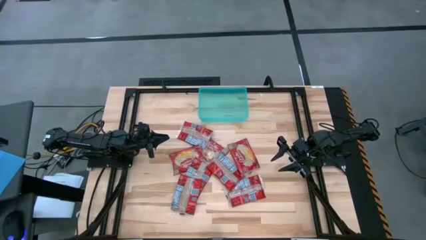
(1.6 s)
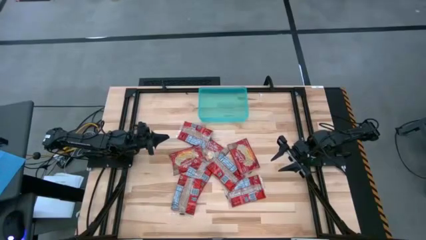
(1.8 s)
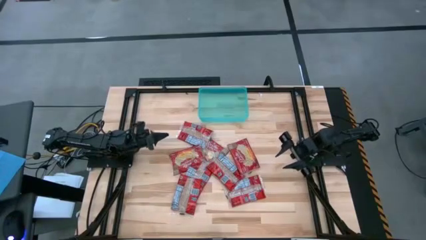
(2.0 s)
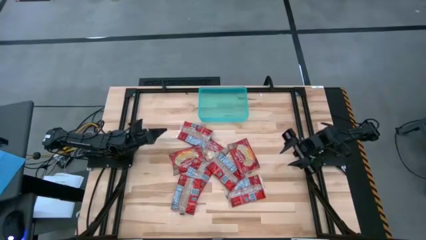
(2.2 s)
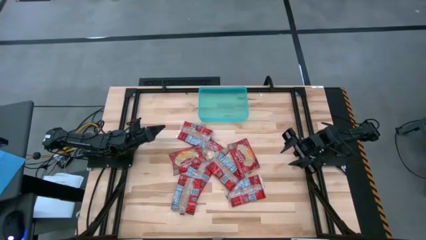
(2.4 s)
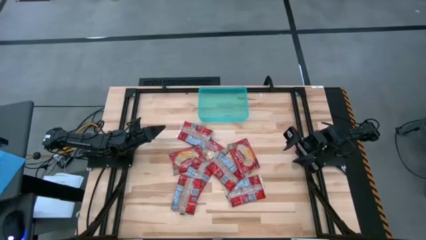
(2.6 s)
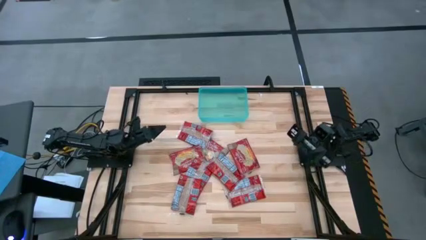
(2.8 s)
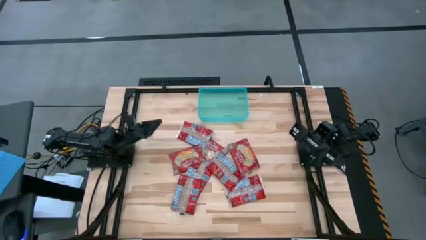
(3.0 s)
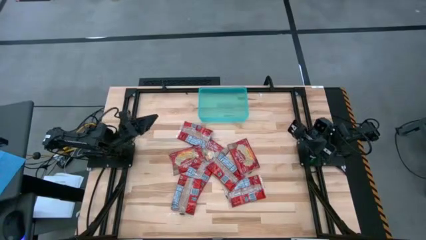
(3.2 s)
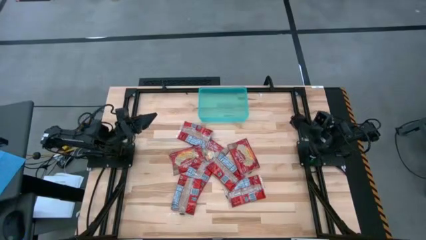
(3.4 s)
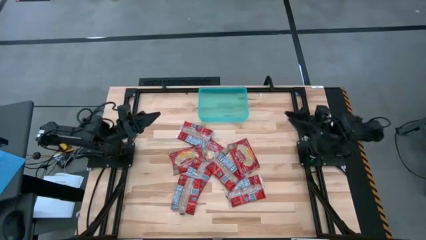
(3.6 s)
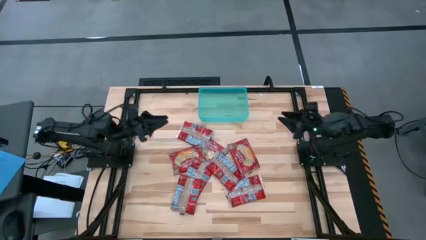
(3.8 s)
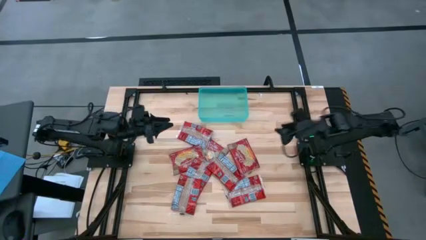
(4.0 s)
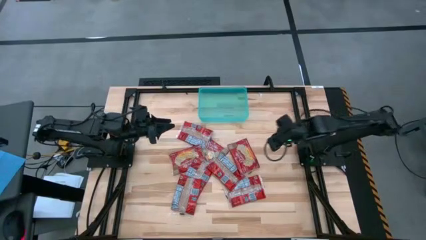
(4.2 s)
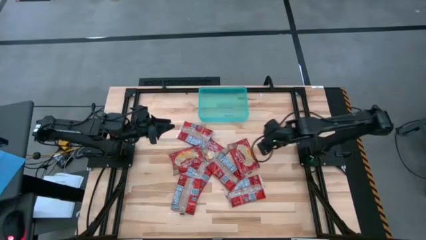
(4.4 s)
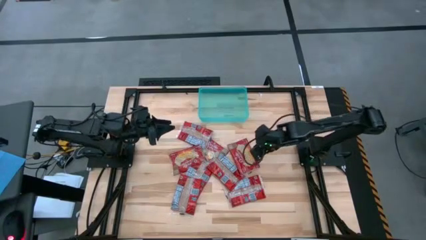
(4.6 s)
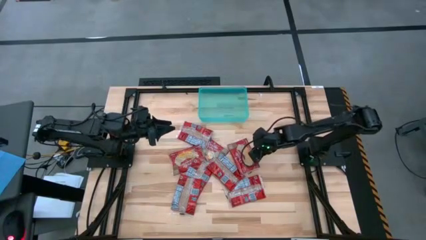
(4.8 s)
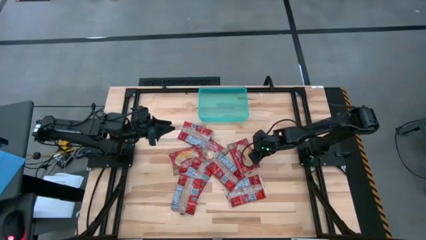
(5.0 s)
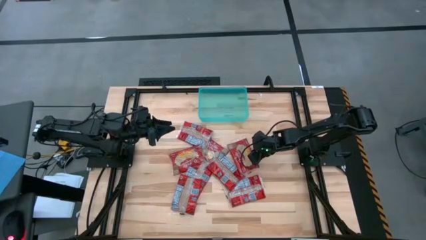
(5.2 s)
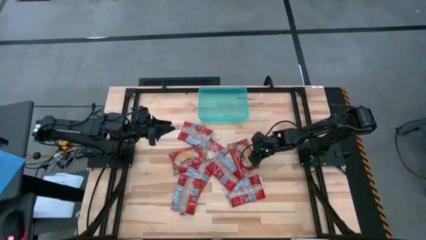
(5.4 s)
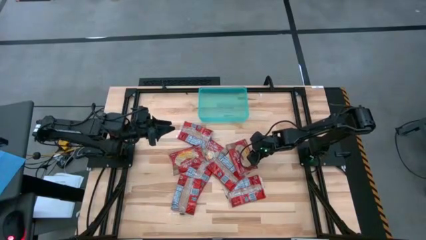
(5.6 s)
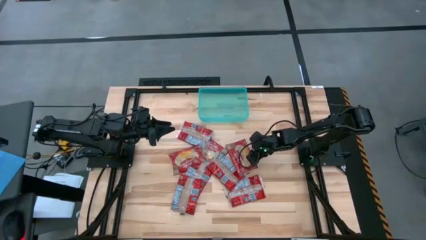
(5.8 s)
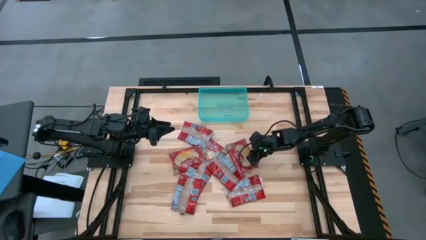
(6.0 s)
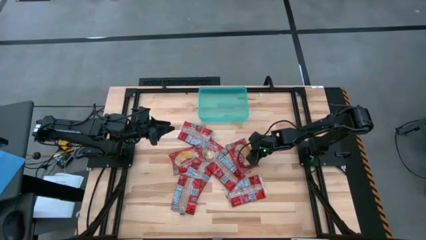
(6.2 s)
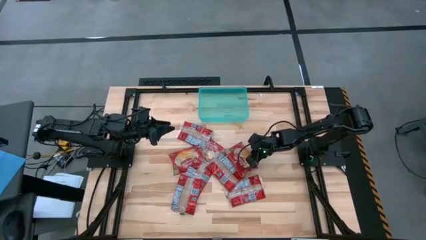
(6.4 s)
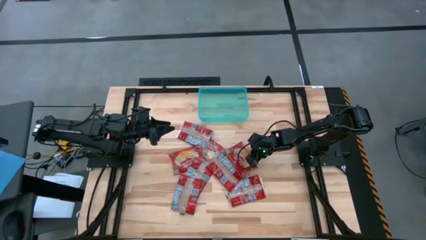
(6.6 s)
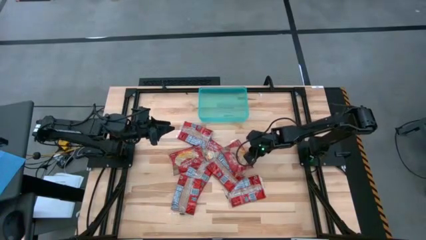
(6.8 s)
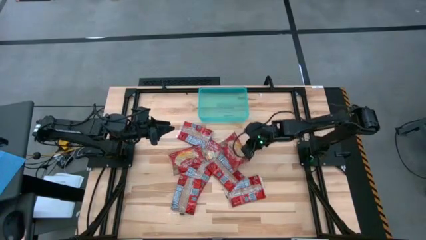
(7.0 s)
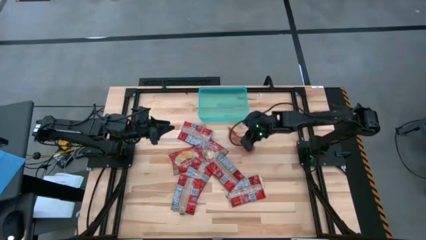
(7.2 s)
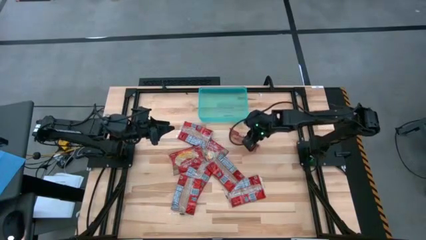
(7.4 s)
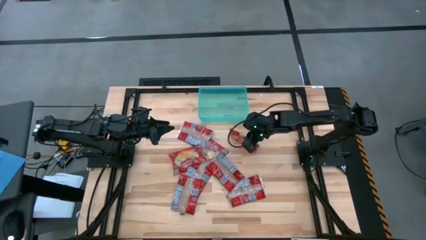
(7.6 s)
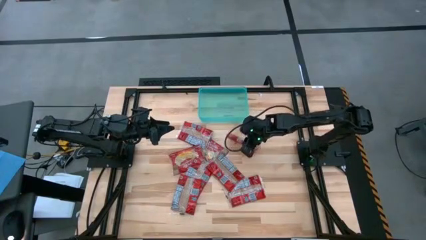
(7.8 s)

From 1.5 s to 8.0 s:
Task: Sort popcorn bags into baskets
Put the red popcorn bag into the green bin

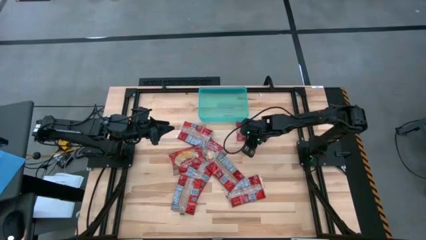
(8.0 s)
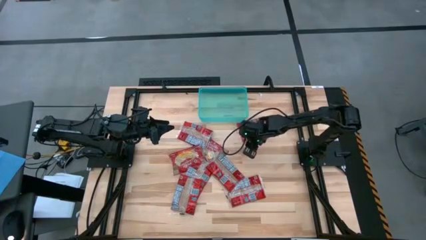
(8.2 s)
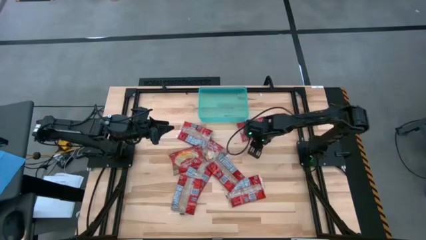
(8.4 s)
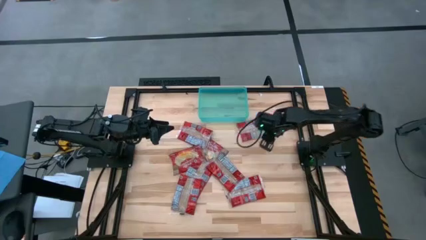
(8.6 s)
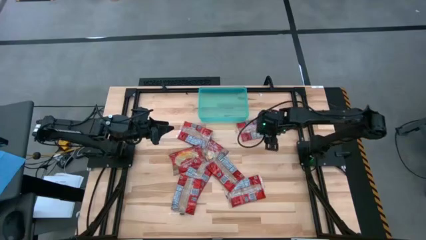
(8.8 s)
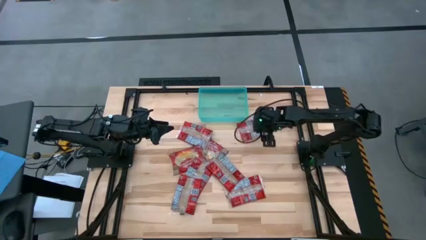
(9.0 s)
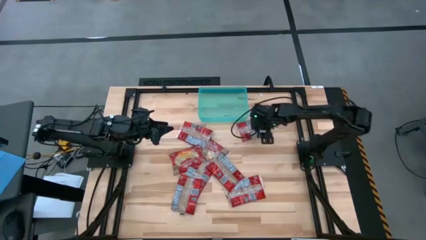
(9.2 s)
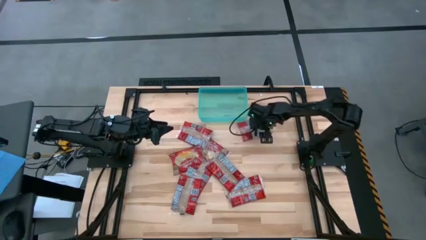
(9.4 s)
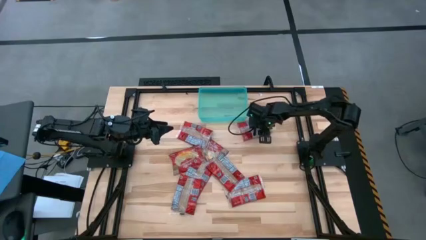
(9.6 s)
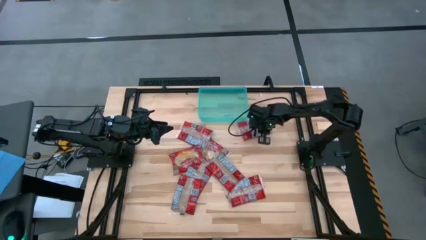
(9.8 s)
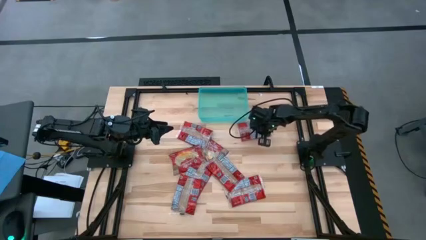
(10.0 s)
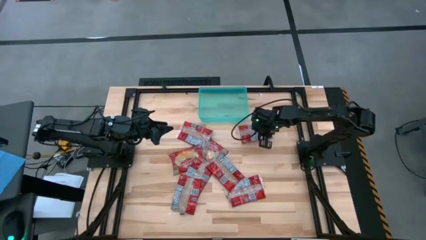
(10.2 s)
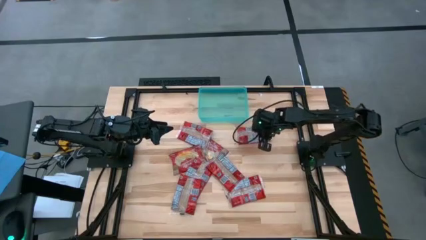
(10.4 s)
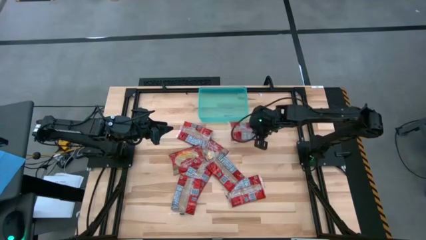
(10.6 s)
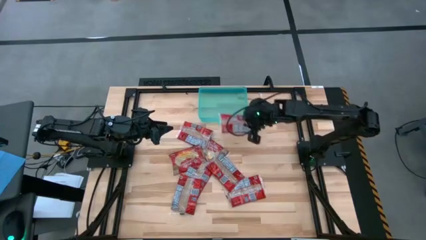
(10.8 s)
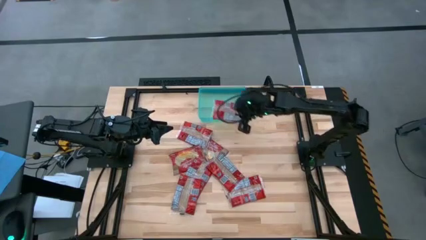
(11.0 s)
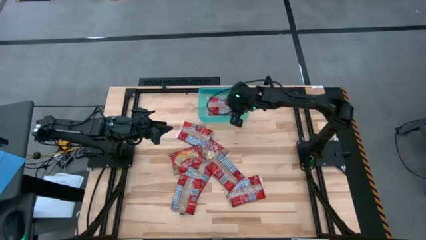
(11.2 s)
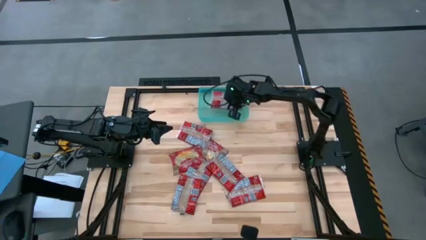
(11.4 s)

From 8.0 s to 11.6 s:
Put the red popcorn bag into the green bin

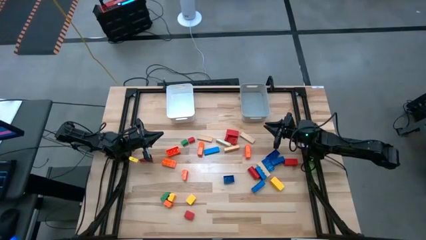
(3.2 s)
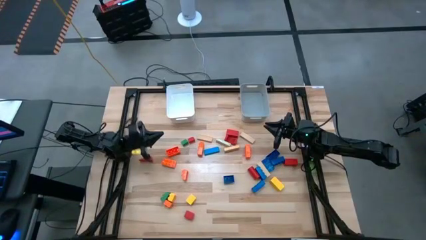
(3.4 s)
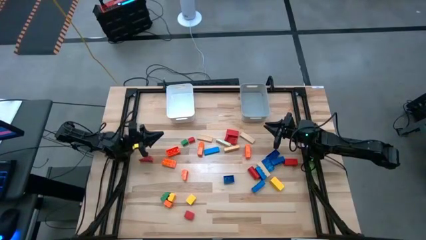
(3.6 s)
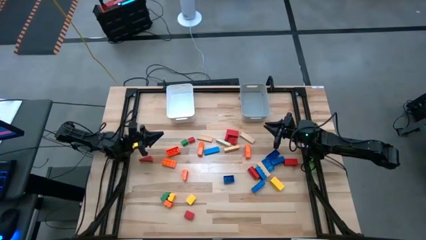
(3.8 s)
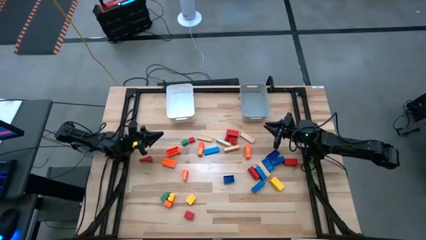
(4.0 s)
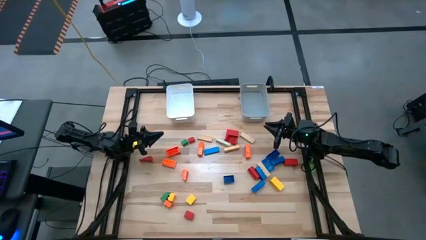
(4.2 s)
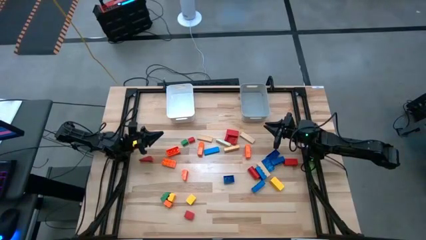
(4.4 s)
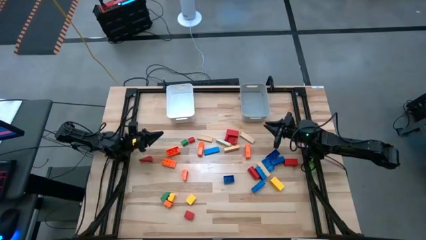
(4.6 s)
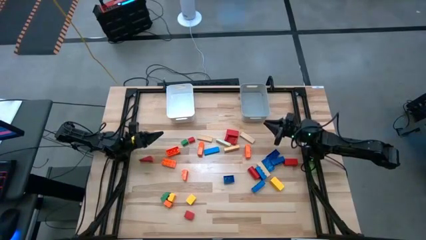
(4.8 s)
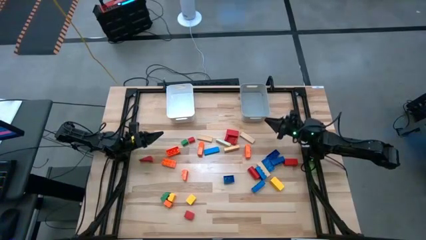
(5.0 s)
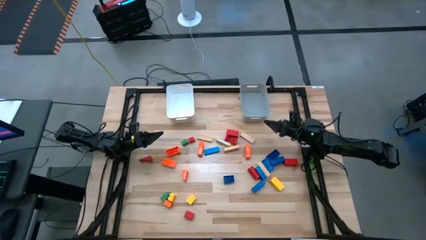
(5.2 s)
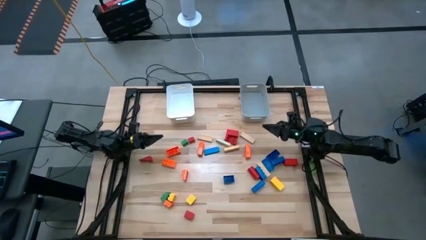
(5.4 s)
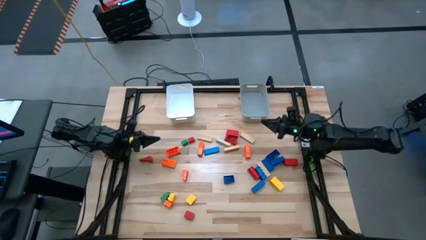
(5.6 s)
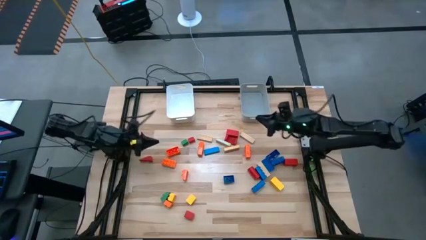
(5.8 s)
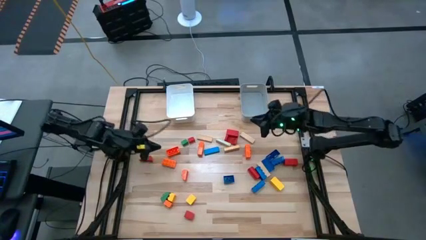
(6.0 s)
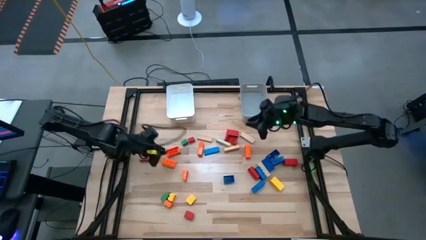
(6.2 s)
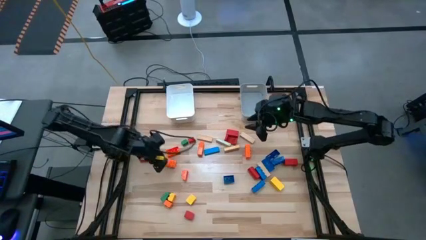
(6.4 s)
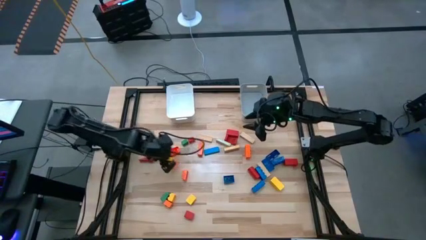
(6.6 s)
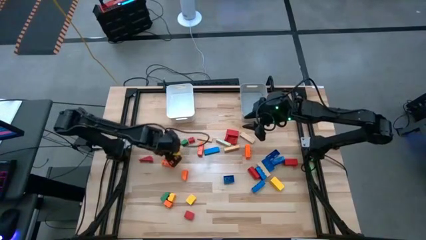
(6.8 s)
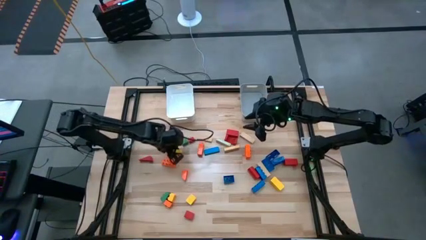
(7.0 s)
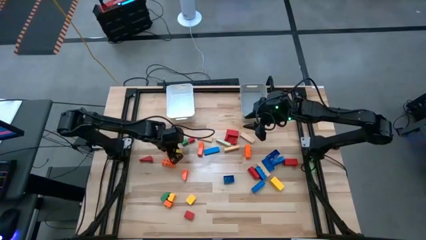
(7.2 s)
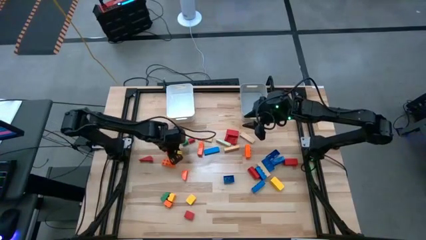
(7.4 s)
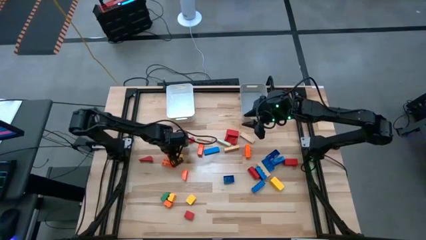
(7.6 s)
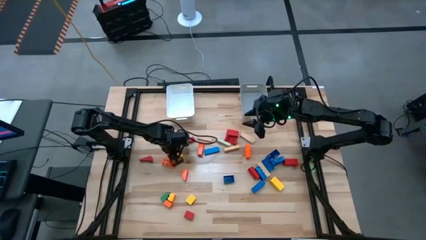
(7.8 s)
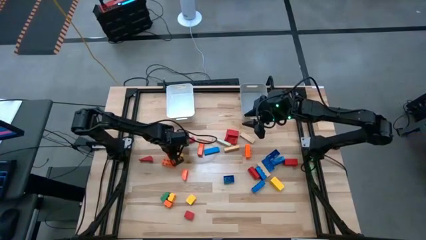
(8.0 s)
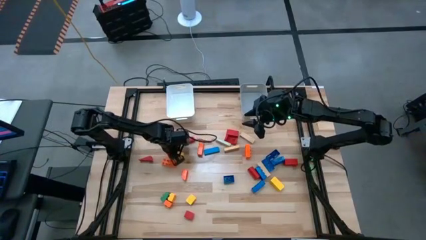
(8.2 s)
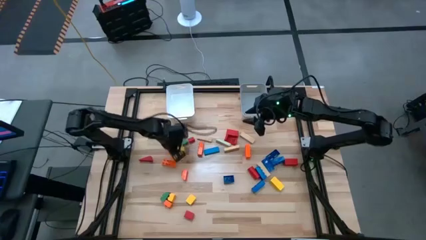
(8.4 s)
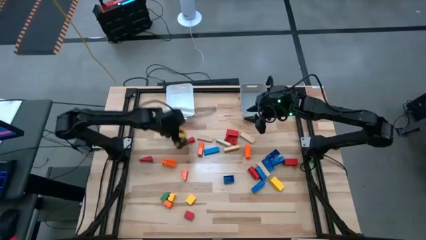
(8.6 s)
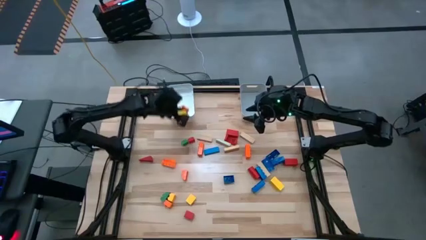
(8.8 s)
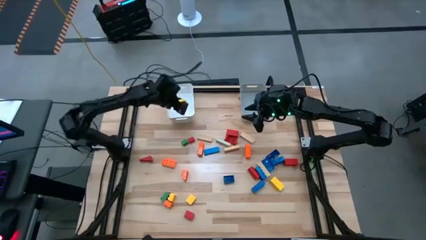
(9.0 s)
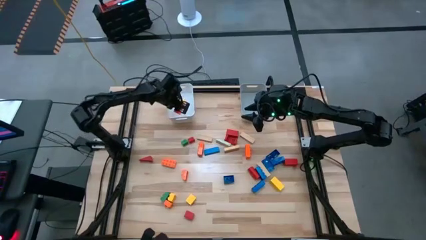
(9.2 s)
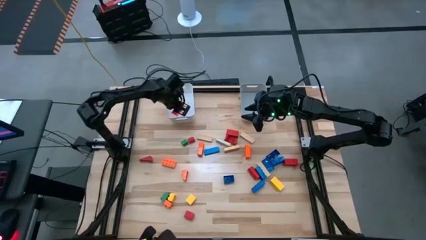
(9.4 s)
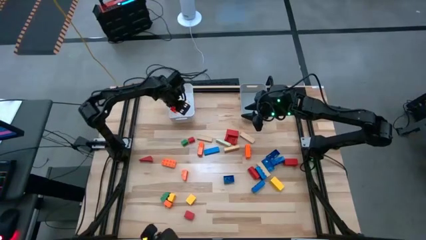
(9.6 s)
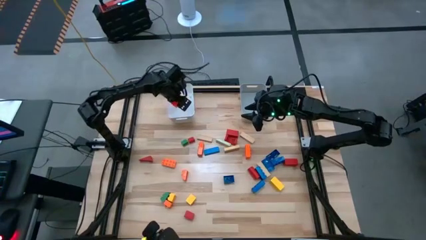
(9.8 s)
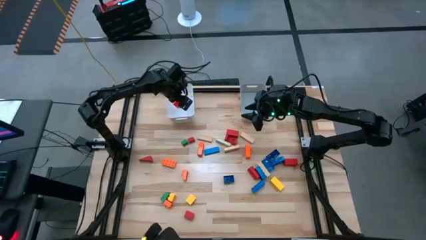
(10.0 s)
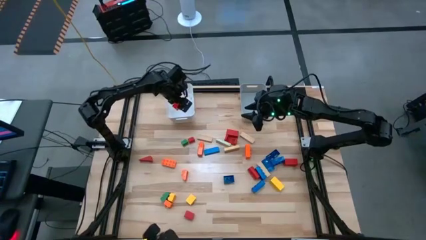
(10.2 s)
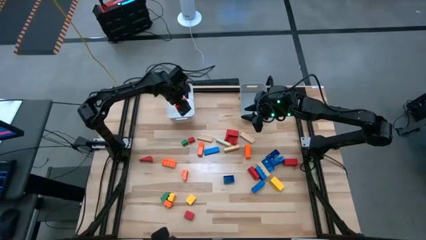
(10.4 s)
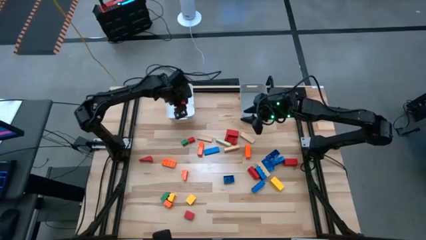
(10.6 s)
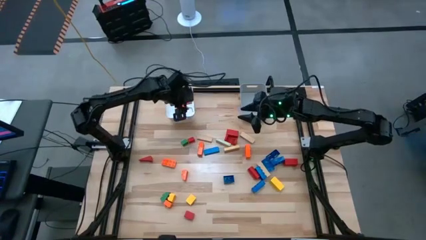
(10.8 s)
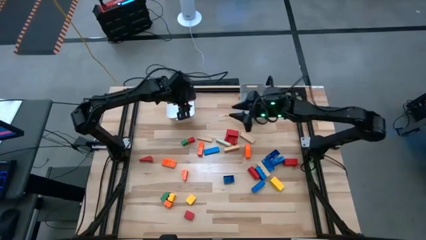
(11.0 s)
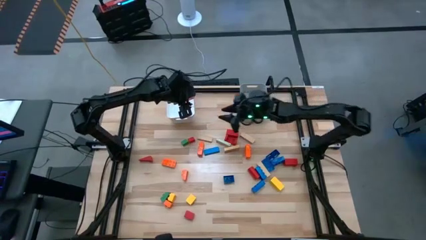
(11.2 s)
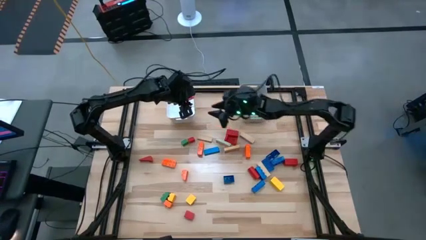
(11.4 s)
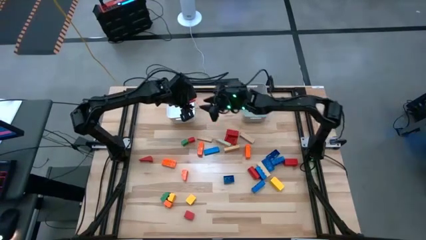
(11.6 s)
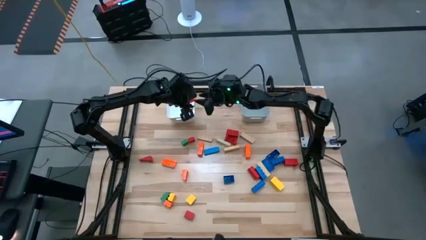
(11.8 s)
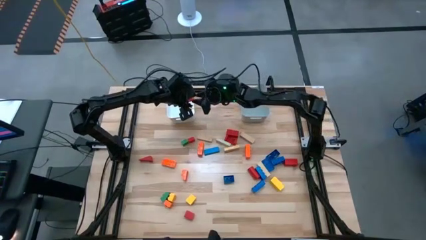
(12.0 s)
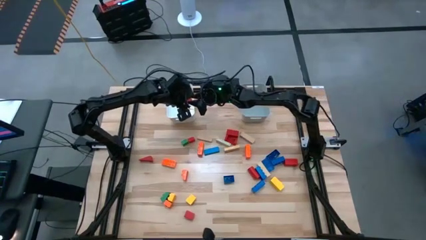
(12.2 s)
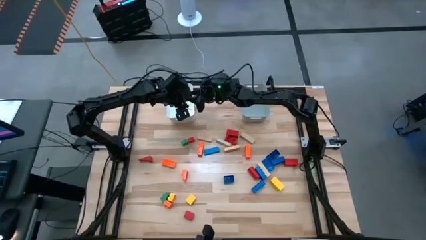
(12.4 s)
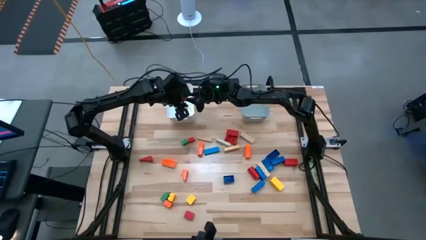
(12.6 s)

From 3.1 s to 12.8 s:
Task: Sort blocks by size
Put the orange rectangle game piece into the white bin
